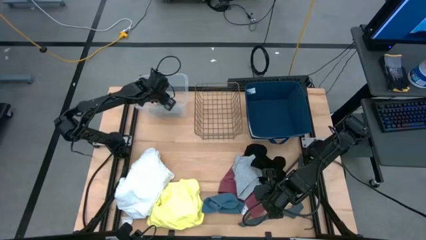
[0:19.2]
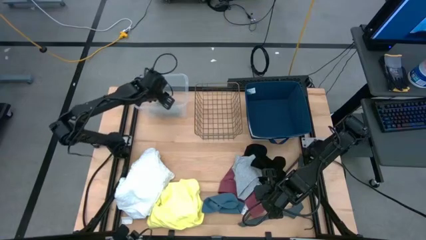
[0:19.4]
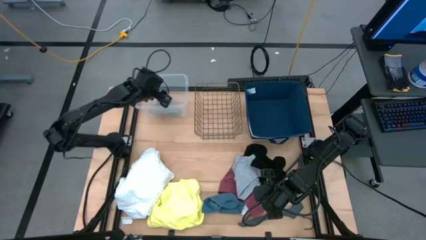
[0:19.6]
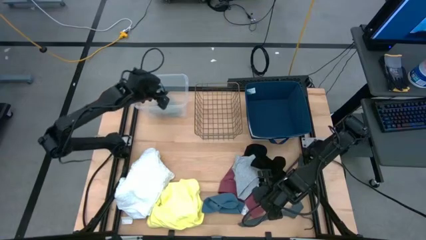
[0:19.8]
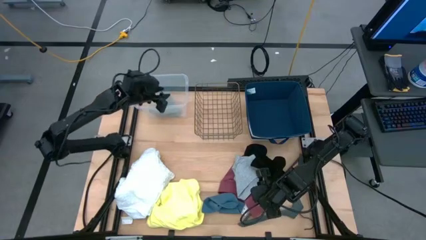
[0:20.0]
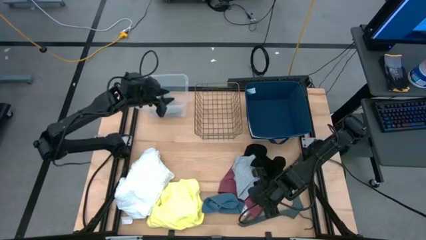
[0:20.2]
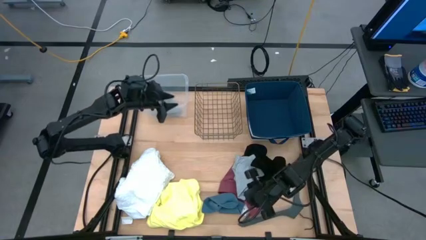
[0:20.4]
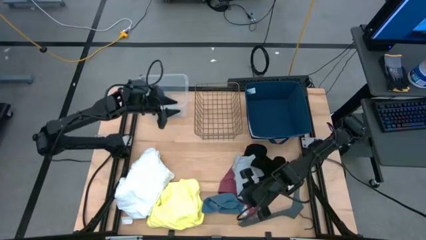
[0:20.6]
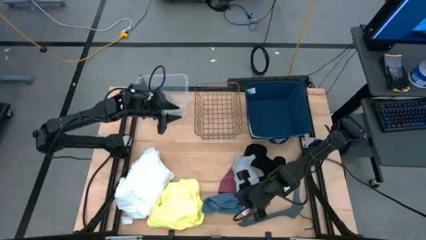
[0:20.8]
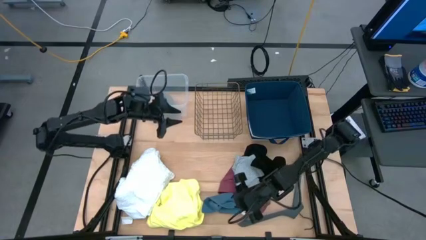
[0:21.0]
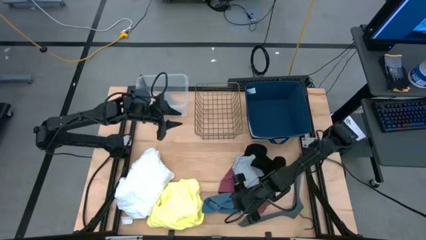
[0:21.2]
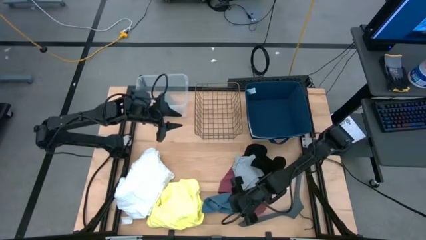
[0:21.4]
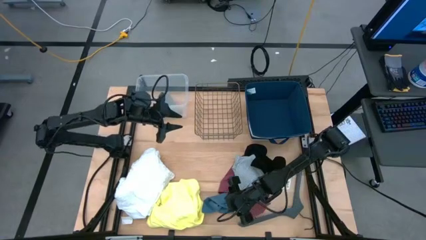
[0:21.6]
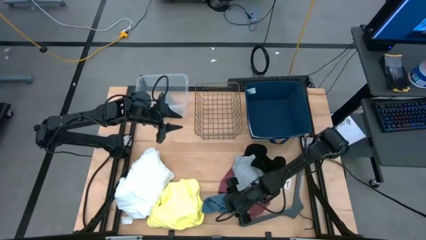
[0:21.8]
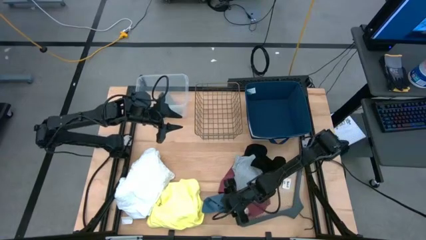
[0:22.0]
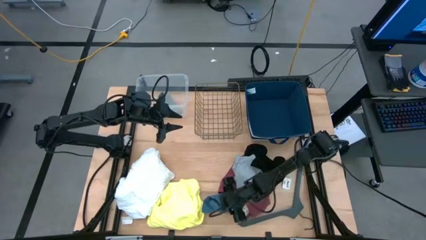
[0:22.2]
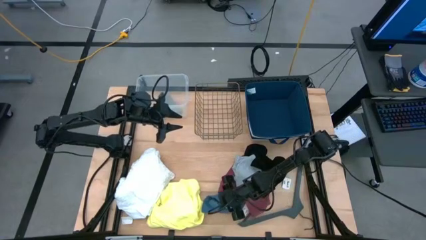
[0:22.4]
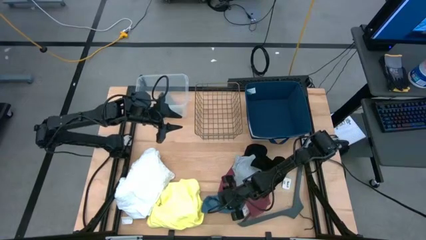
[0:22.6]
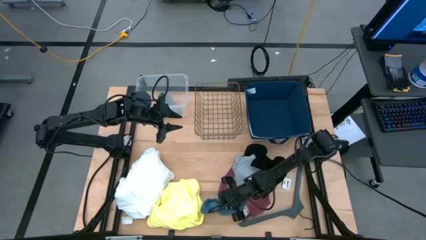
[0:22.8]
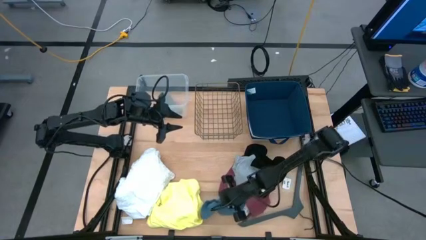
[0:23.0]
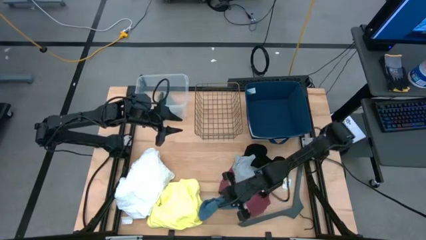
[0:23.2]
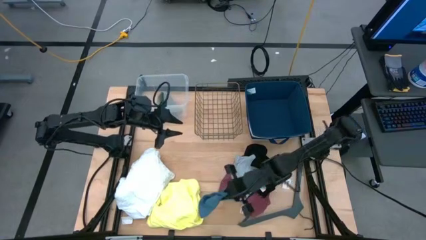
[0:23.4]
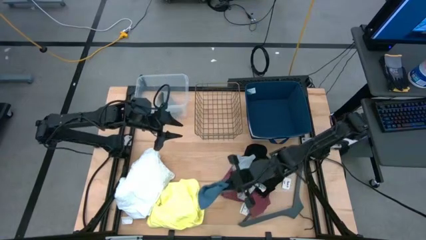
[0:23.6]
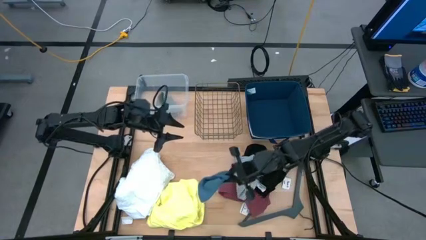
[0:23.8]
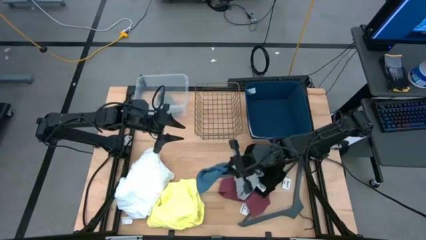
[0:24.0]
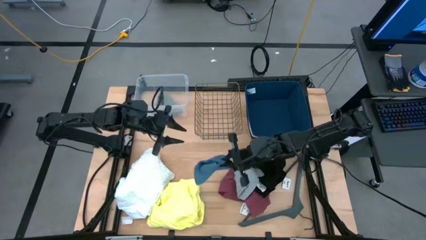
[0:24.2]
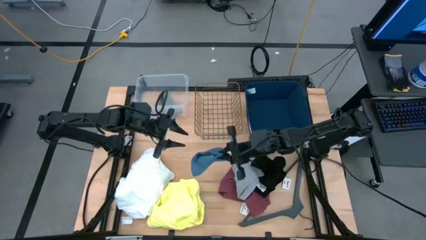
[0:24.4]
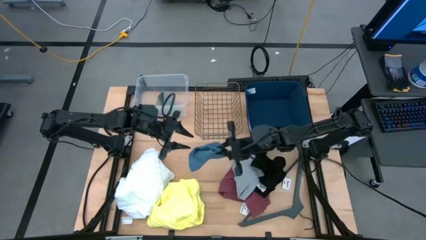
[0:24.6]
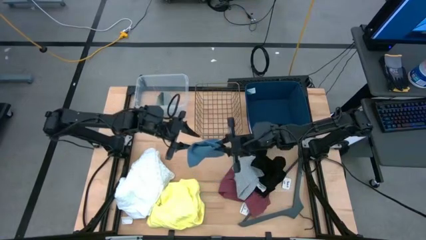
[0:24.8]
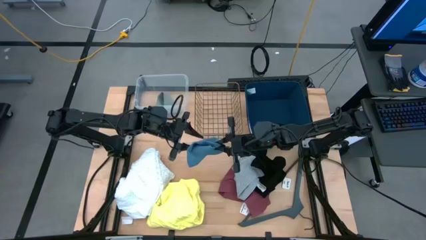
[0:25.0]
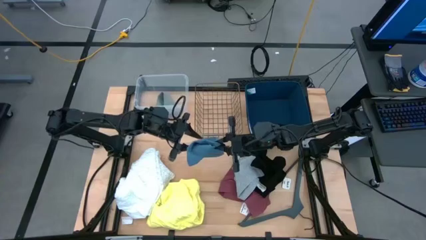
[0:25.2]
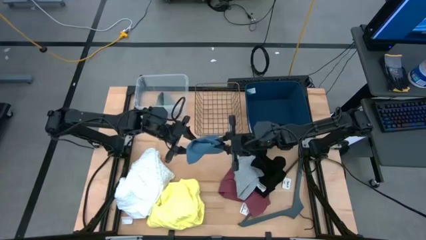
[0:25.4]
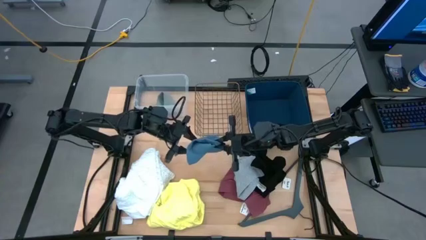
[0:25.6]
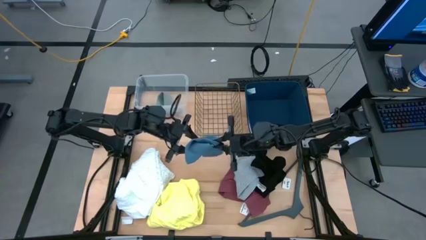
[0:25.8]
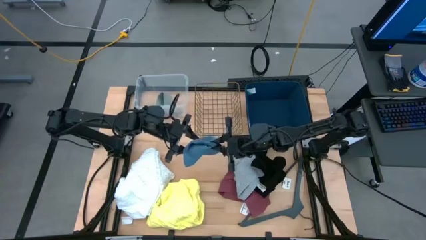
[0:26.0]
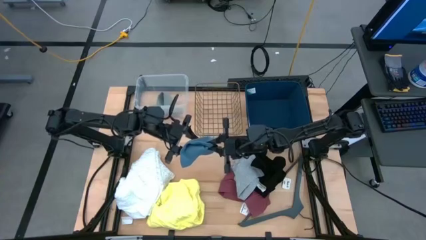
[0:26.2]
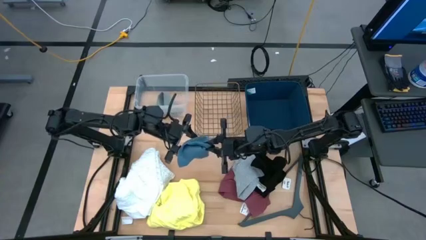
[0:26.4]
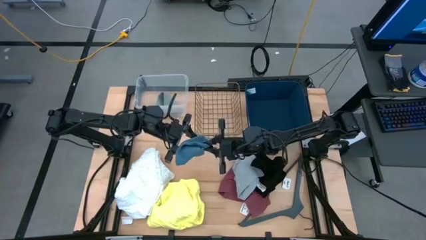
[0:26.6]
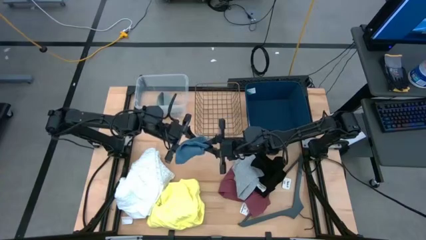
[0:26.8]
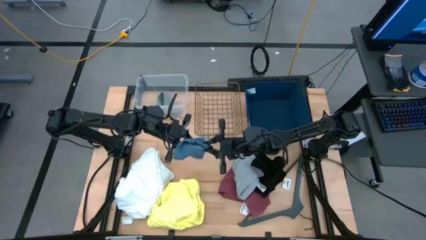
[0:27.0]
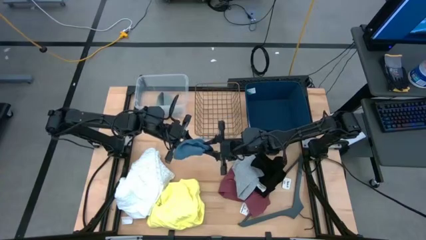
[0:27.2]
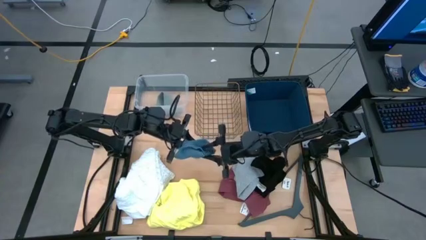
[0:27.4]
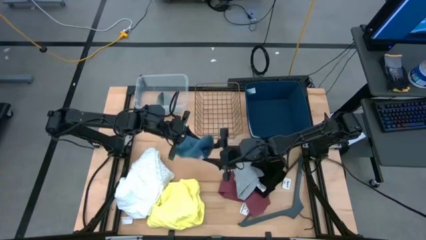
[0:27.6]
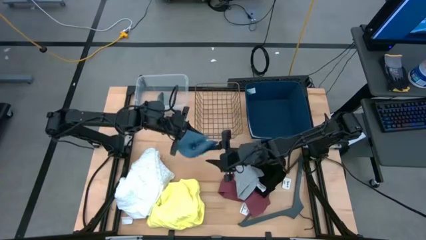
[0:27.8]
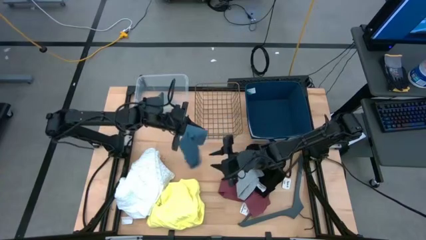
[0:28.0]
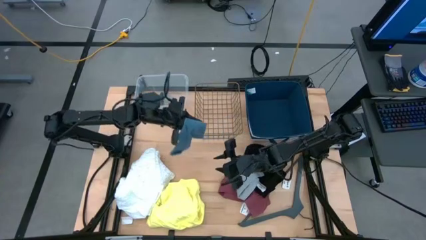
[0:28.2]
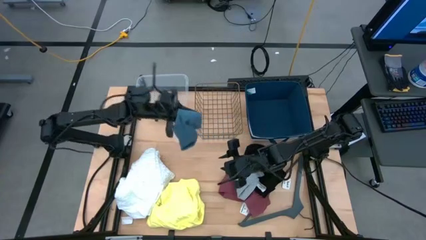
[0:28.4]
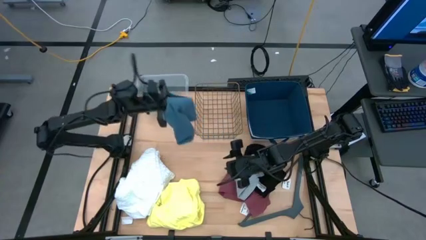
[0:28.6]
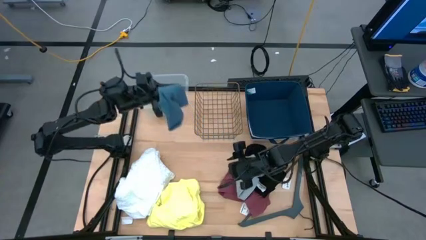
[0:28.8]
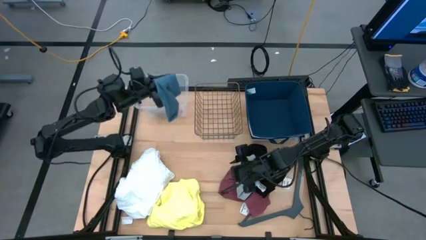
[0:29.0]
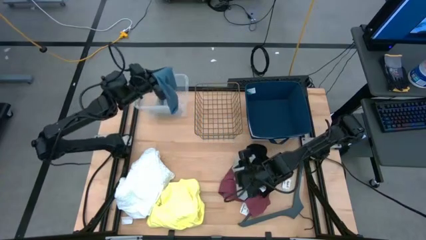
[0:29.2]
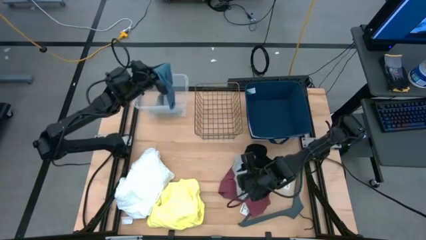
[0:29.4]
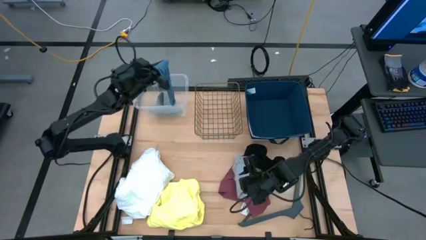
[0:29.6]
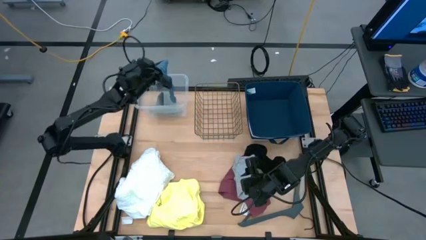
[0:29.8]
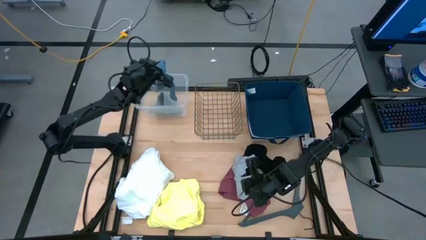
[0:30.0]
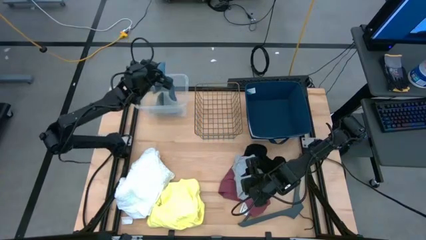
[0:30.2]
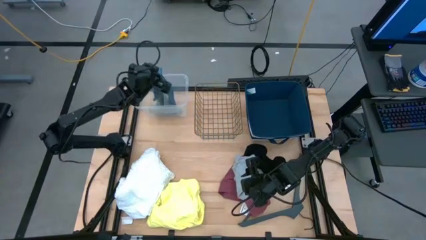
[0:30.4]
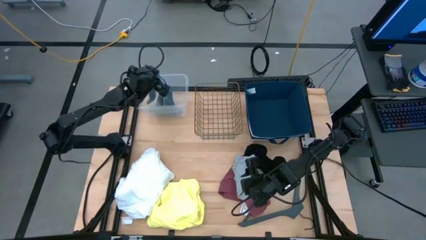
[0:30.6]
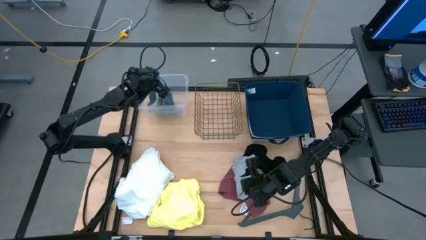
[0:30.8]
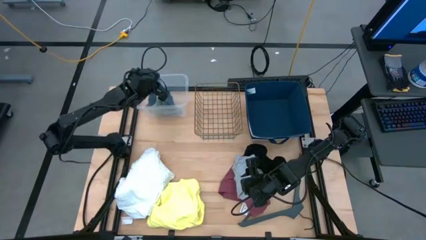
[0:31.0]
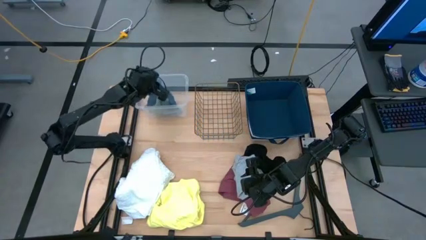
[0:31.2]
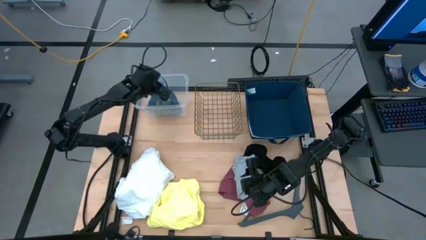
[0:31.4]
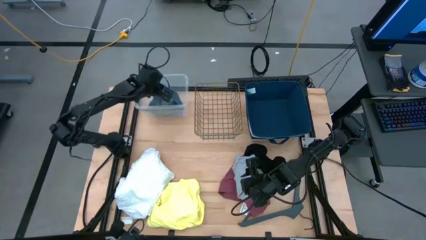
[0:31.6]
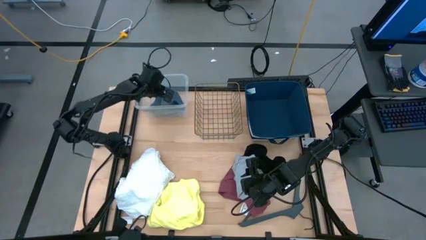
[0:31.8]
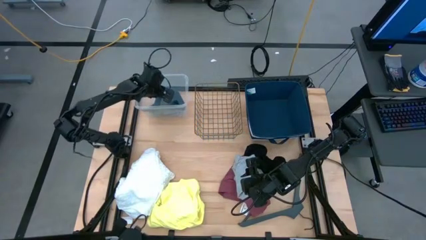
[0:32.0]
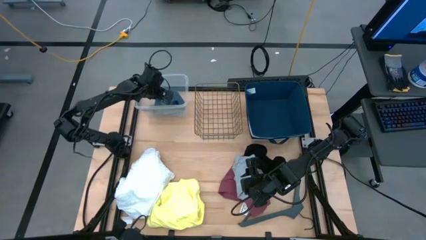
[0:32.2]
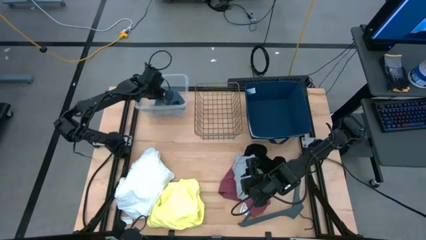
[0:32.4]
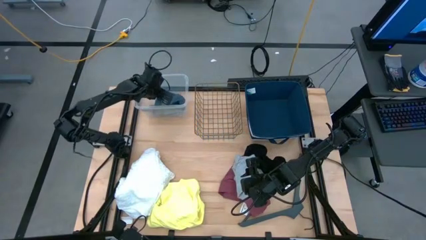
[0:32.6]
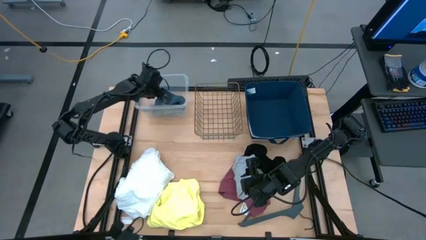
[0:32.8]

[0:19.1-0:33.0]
Task: Pick & Place Cloths
Put the blue sock into the transparent container
